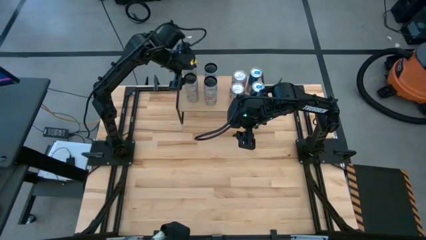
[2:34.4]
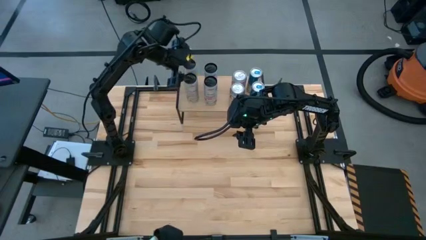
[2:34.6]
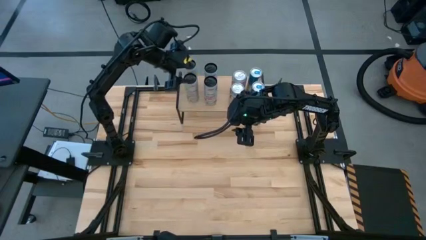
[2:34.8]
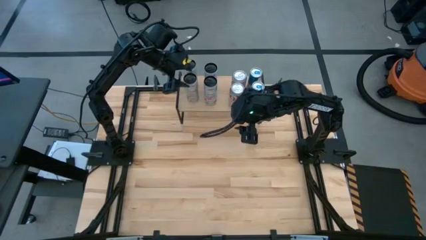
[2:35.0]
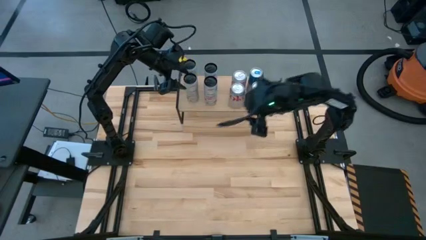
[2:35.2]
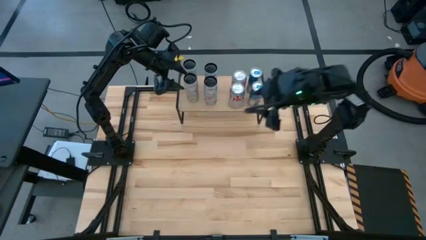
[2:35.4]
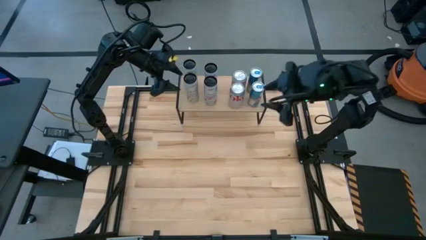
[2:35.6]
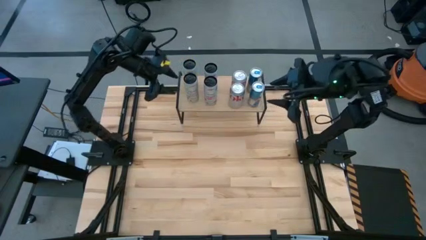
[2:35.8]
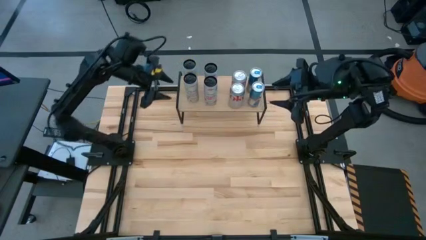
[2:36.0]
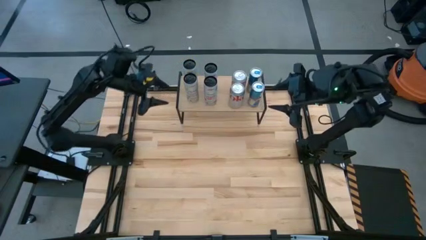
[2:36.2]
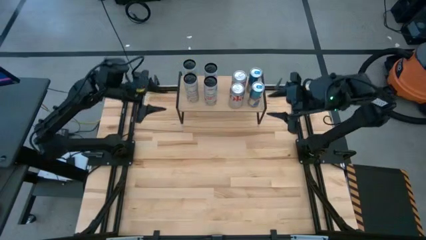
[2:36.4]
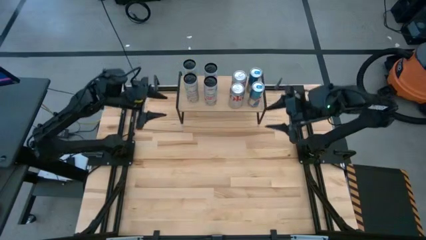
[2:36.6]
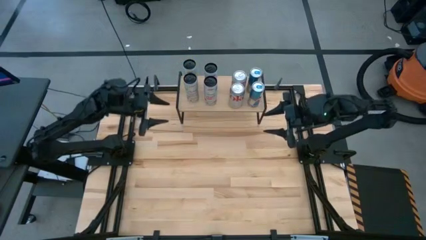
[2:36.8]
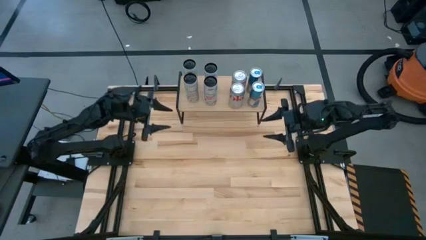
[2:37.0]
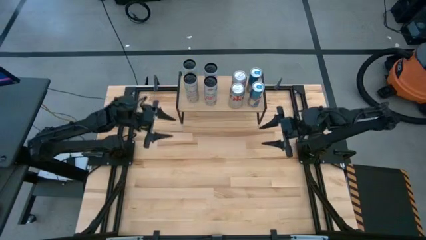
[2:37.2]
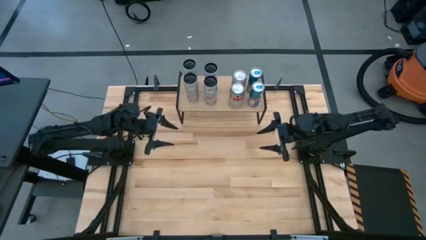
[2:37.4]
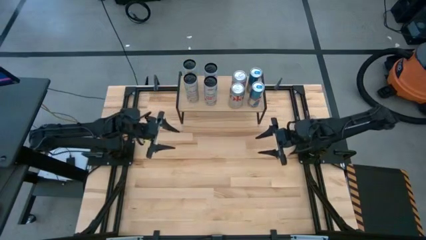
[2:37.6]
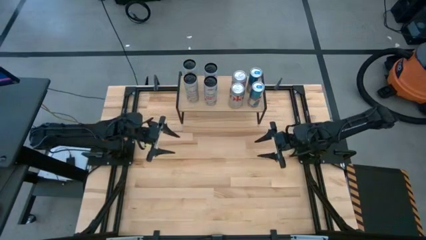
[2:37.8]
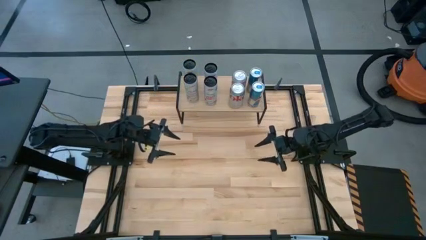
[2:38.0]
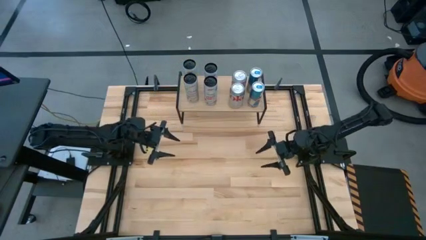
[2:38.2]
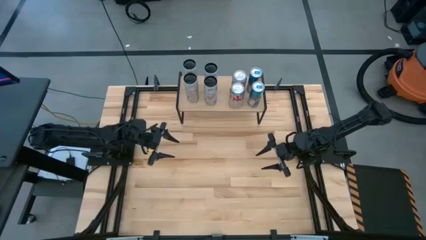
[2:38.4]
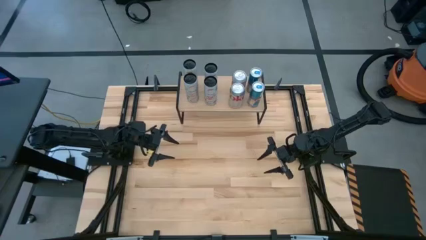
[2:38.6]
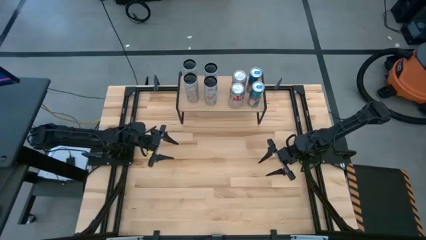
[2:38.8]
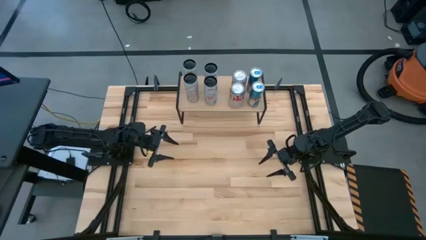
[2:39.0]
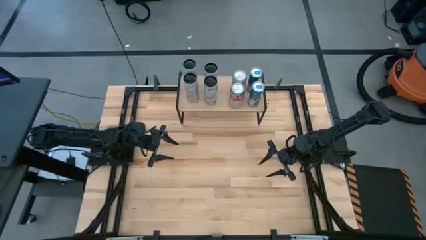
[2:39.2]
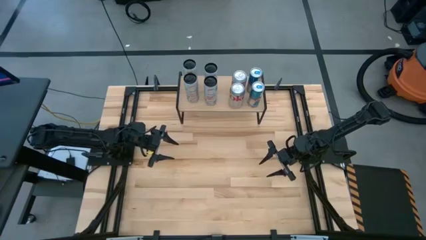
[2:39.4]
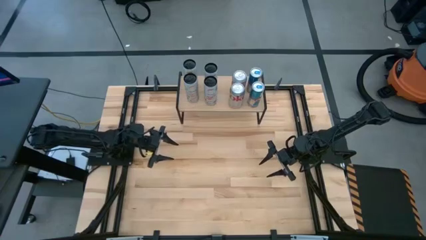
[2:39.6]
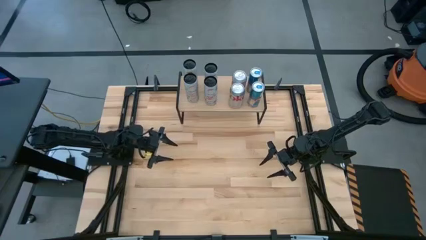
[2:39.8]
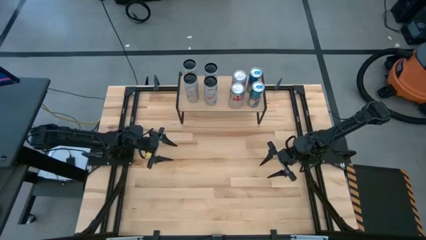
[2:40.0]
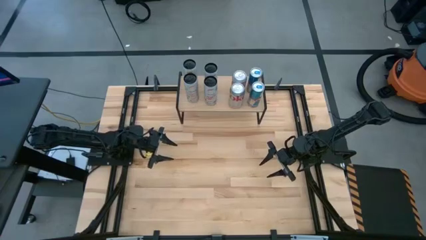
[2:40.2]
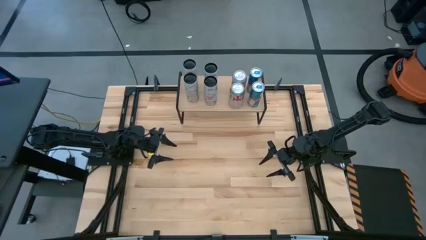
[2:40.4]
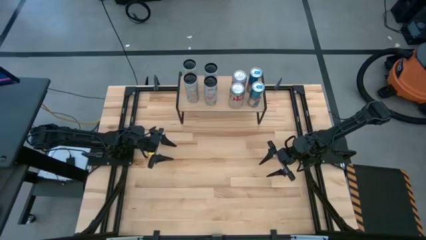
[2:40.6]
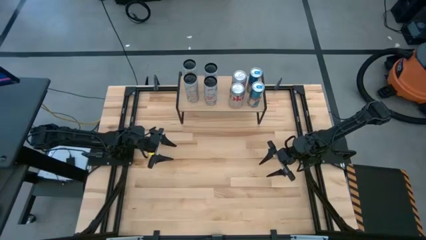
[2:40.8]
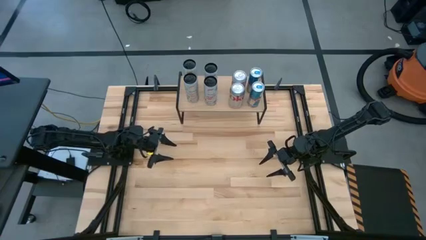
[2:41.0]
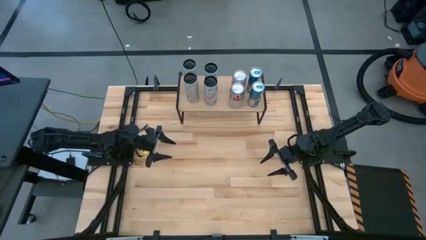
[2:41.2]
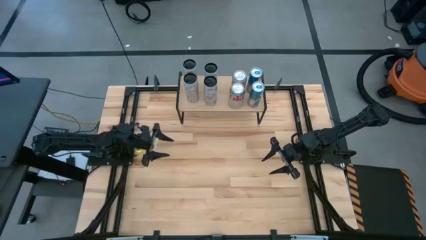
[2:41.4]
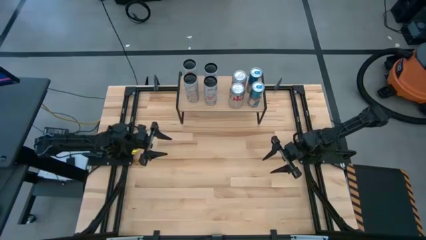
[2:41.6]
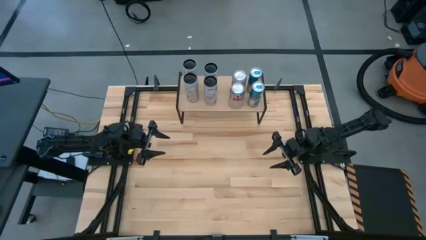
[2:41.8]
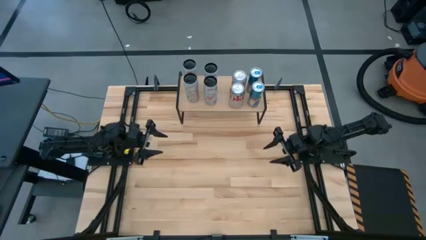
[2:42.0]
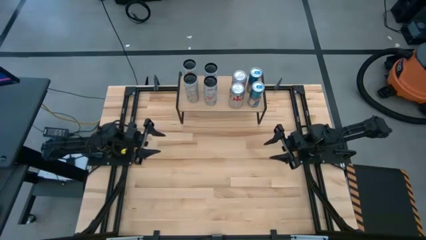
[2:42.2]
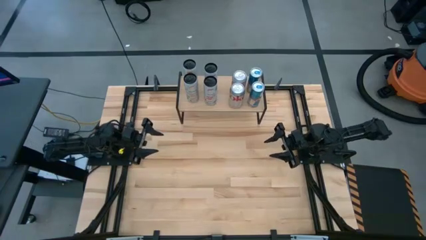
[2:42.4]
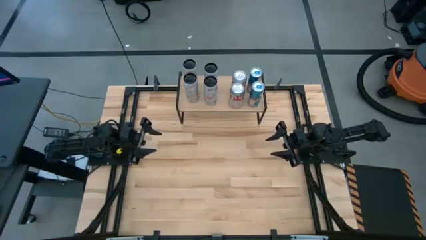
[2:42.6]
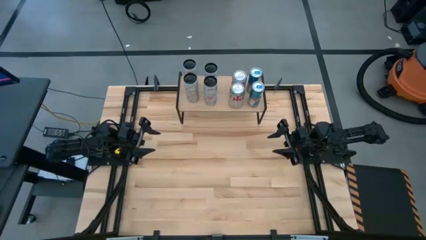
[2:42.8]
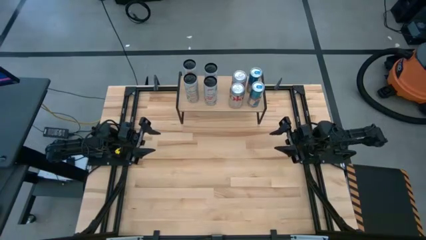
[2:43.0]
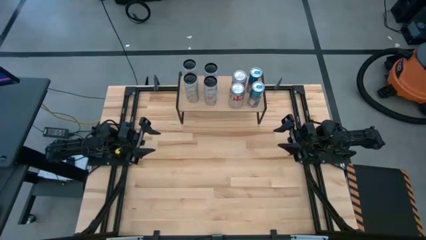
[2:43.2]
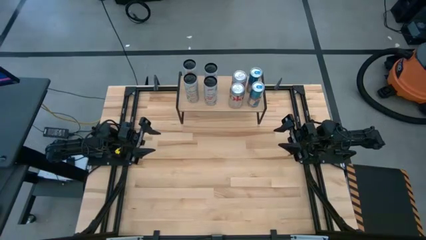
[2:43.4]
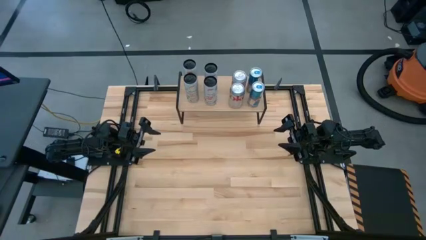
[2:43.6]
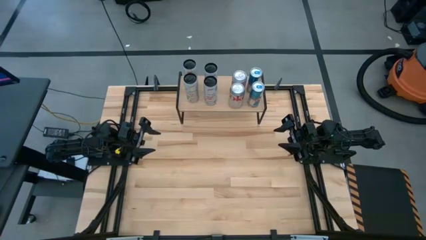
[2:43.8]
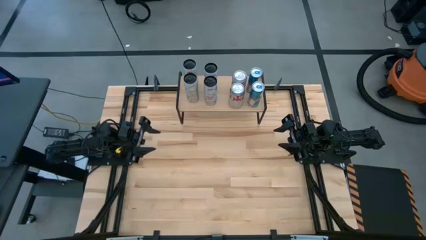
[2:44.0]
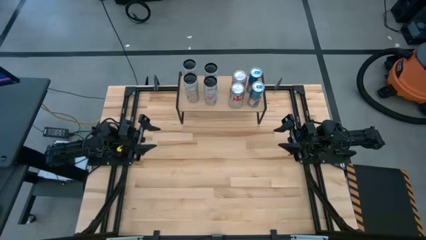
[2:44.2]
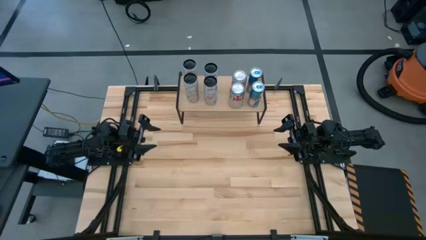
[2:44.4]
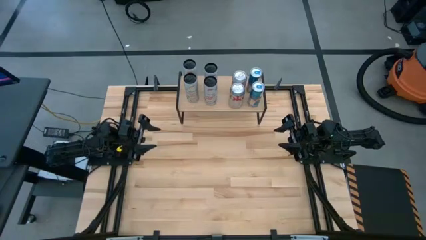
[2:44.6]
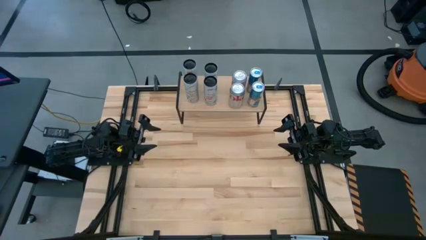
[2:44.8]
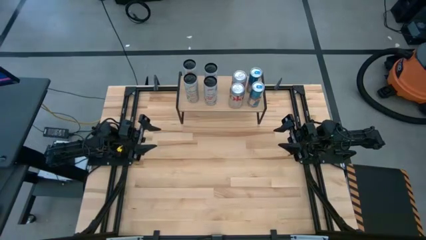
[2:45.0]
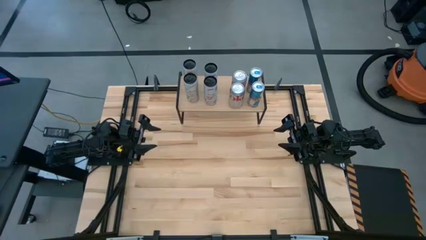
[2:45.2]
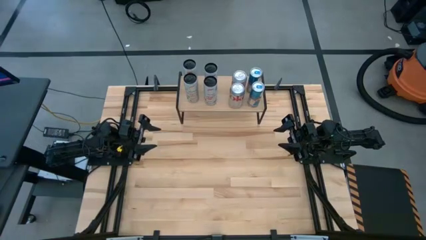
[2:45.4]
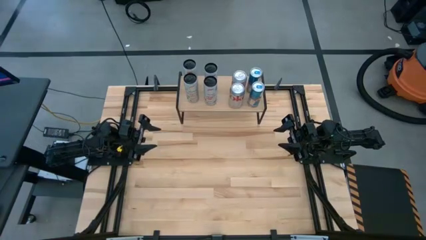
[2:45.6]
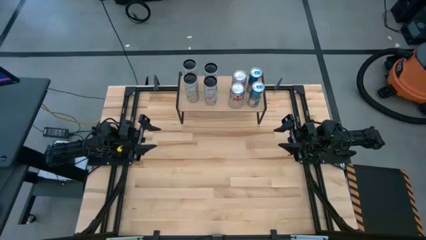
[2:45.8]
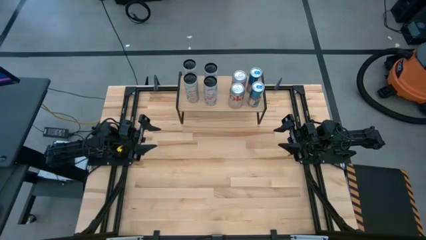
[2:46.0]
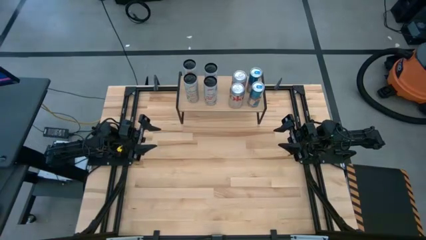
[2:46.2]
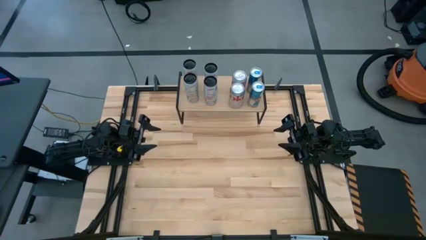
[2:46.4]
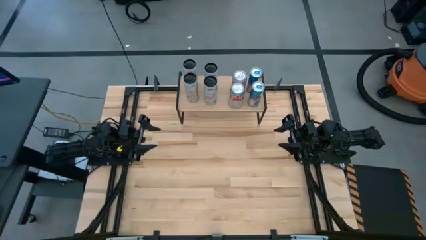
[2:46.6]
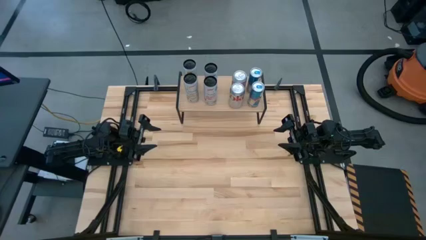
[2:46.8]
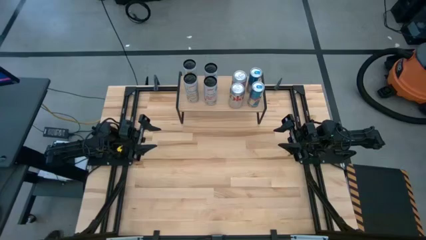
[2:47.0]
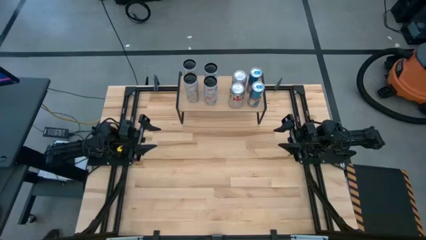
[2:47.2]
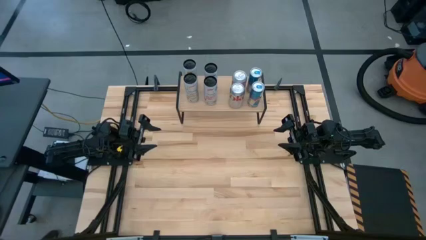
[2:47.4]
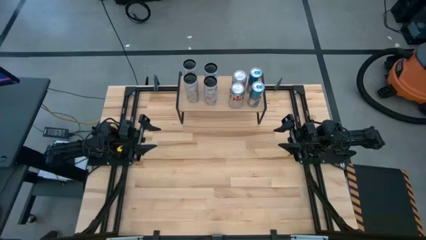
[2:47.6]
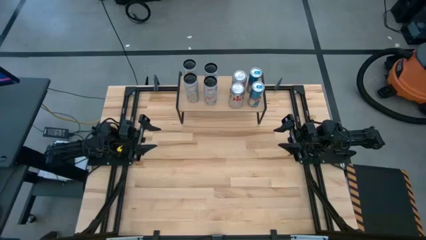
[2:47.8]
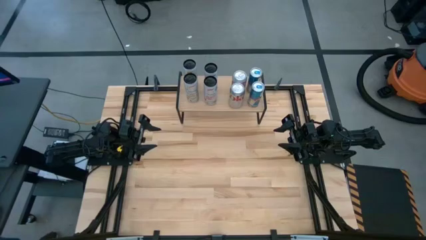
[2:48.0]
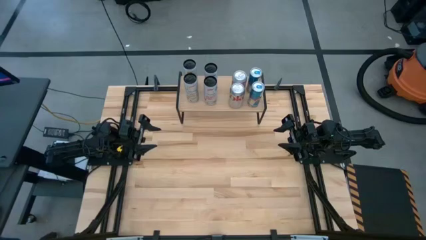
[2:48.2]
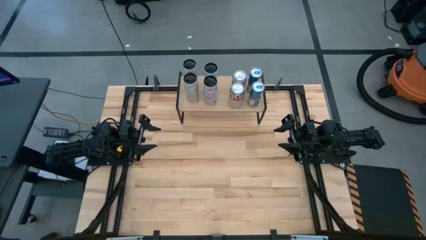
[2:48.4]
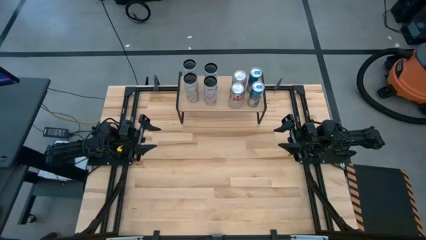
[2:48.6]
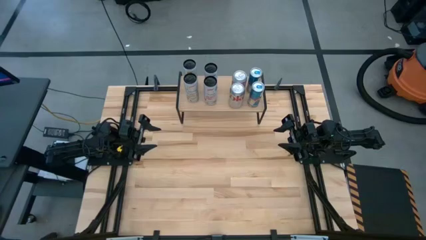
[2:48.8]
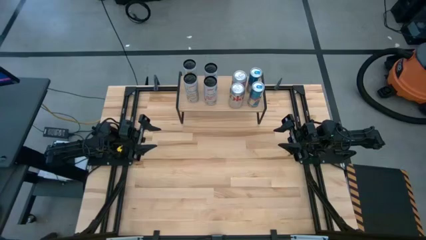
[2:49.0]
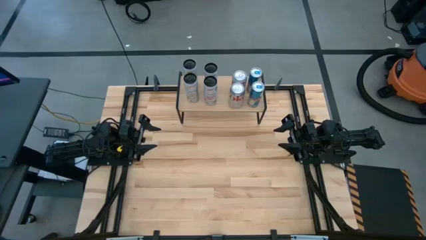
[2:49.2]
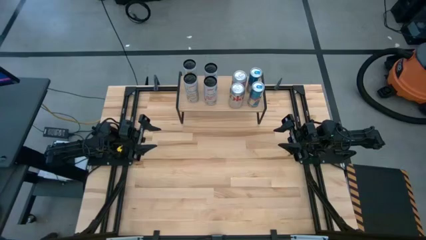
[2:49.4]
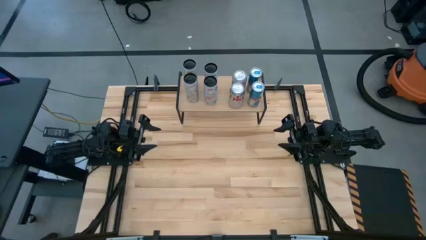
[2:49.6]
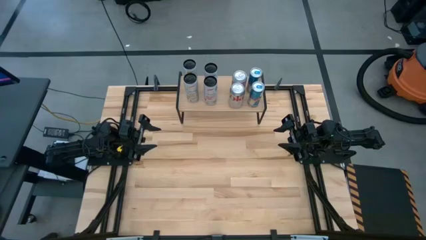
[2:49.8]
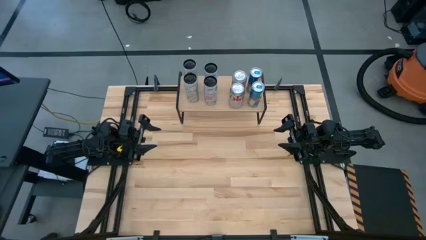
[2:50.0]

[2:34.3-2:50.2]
Task: Place canned beverage on shelf
Return to Home Position
